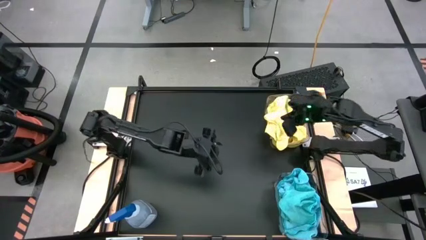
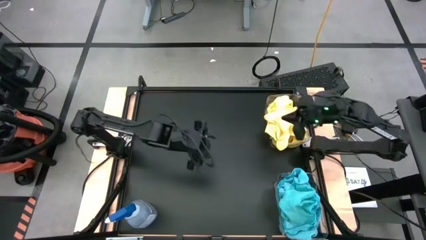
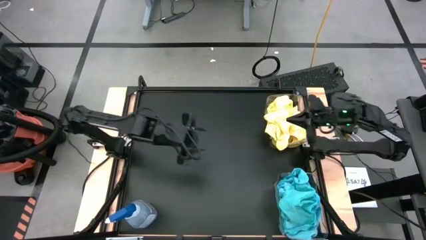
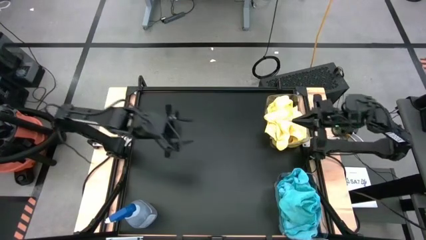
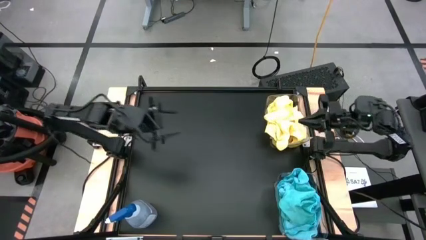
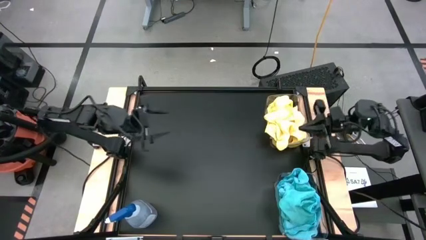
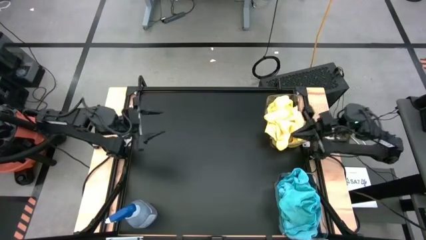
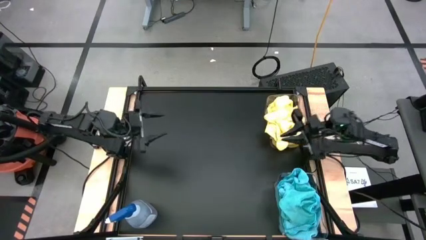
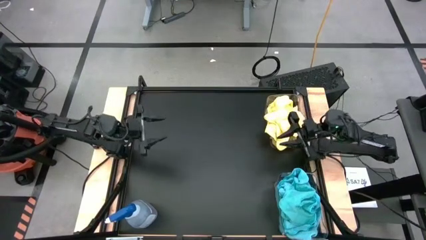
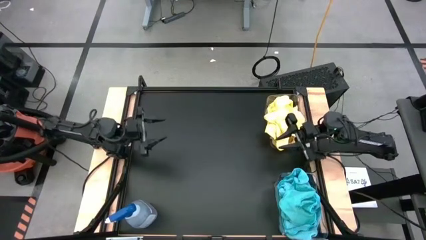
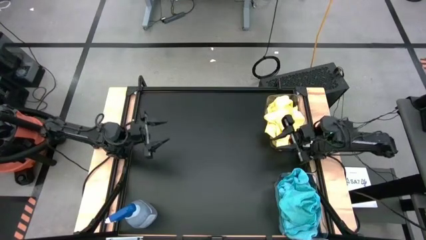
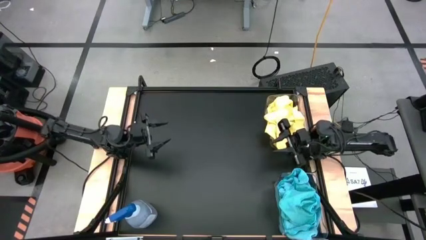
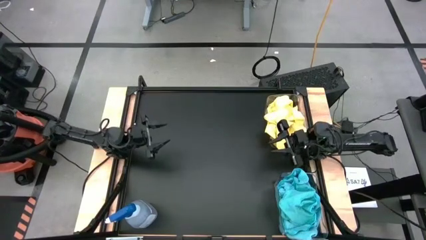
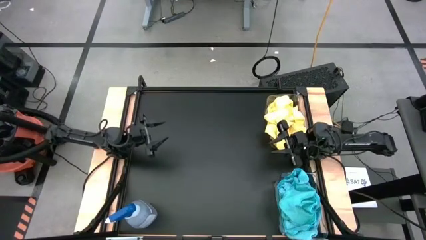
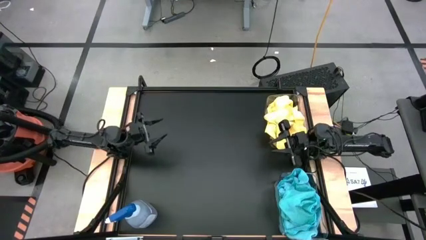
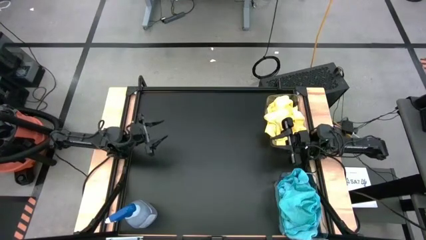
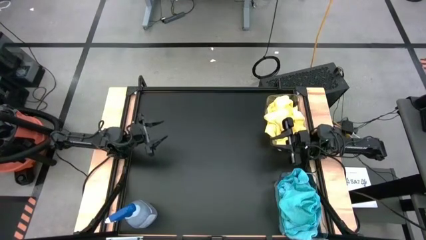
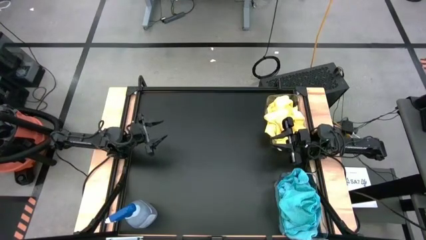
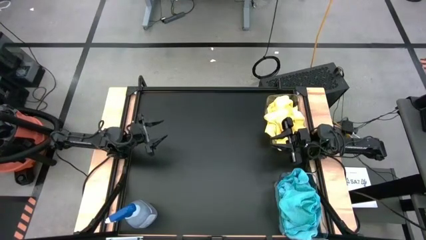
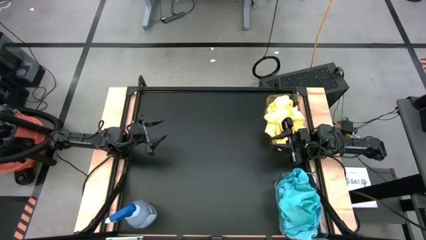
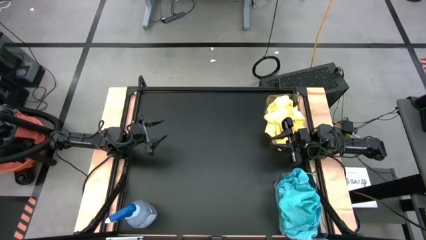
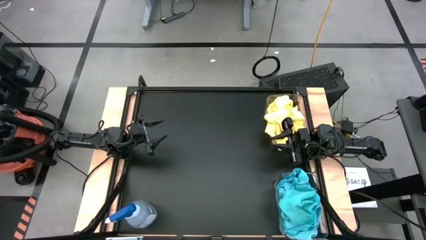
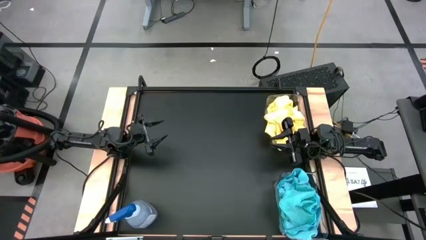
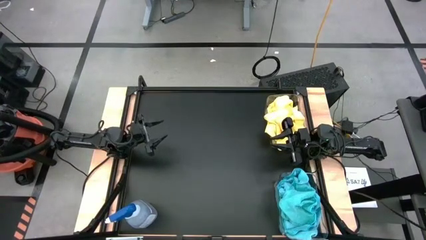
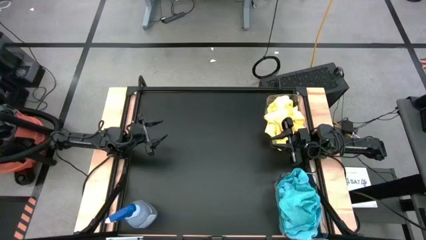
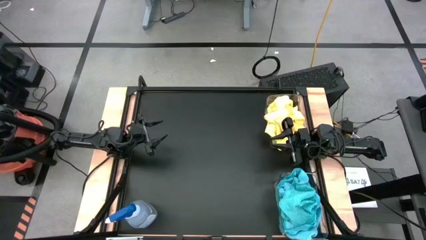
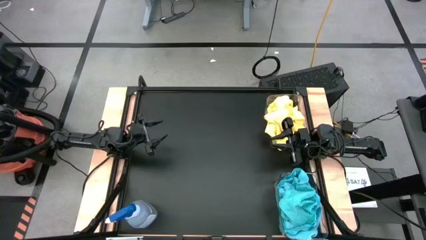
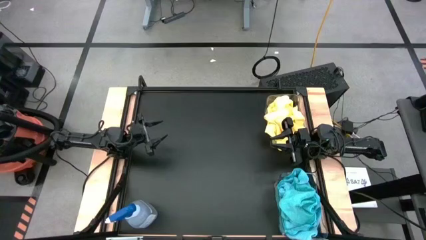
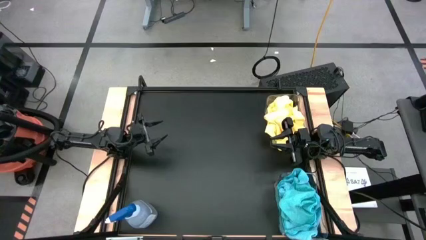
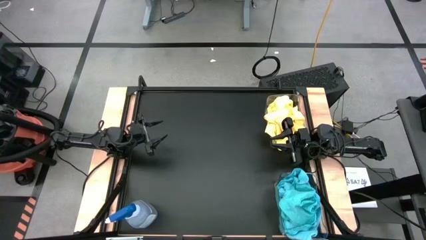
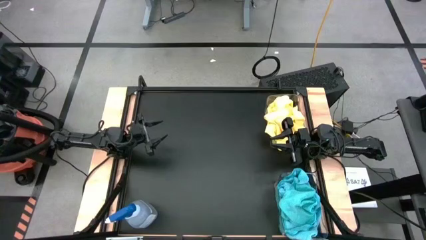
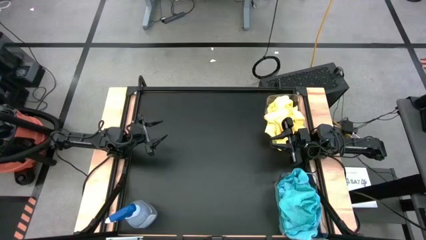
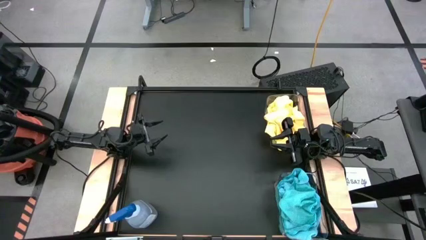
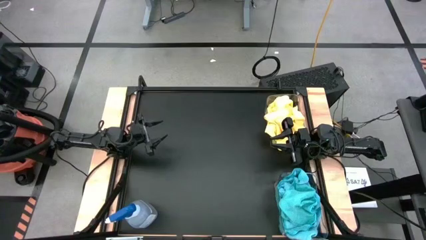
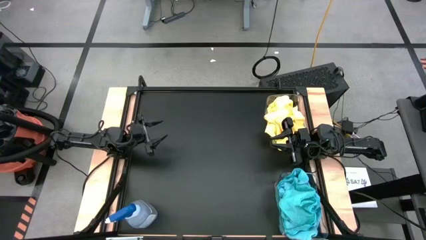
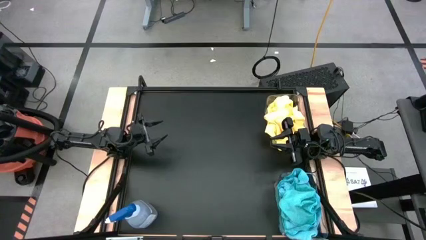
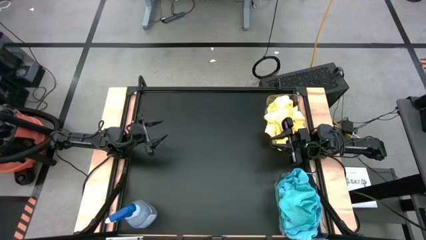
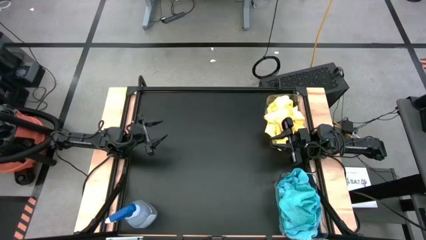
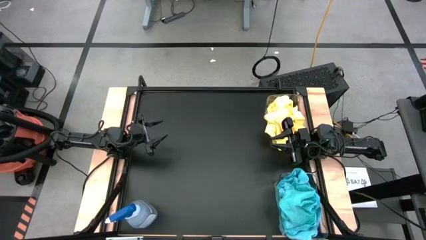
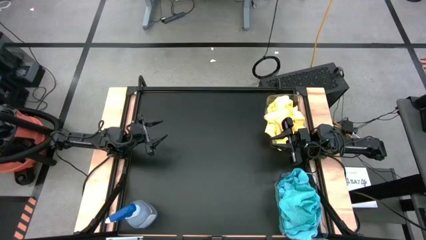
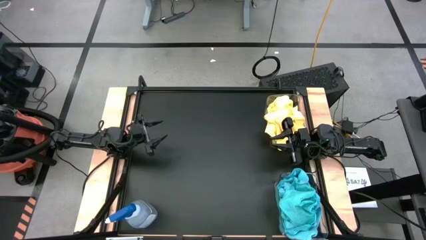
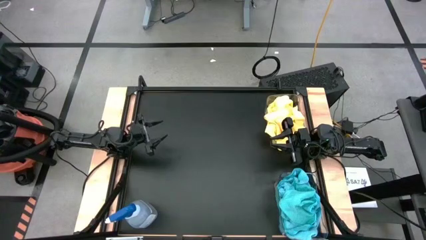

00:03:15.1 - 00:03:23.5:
Task: Sort microfiber towel by color & place in baskets
Return to Home Position

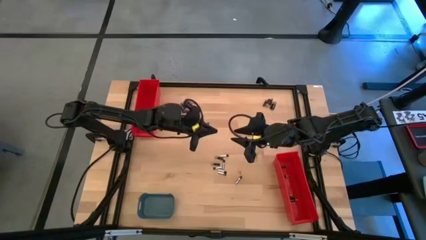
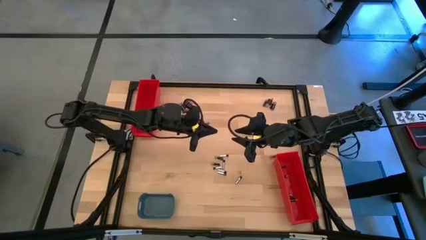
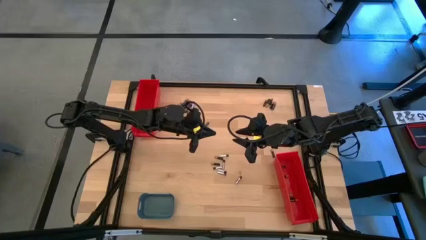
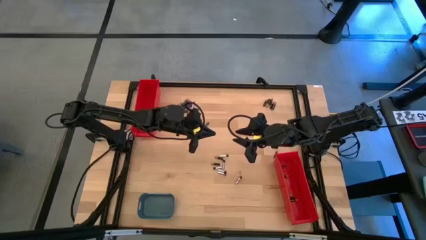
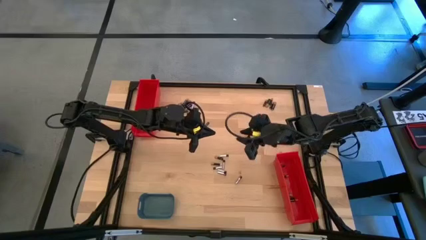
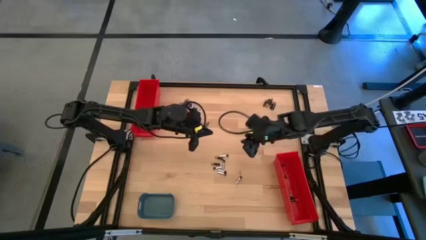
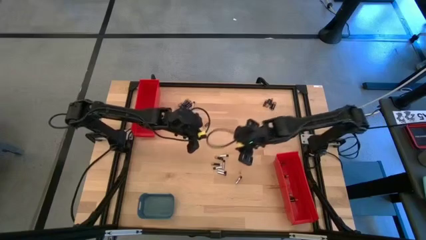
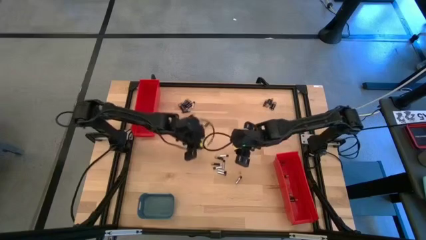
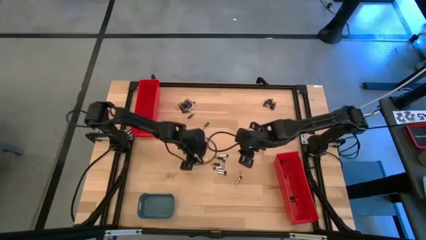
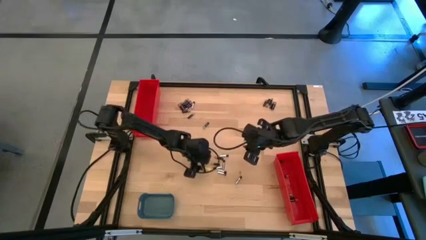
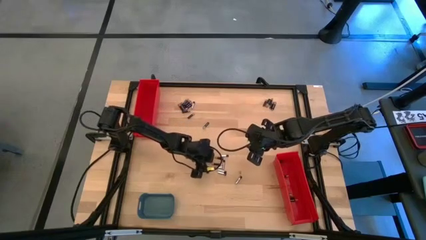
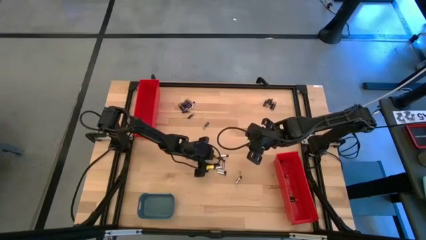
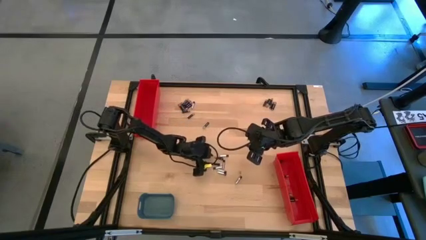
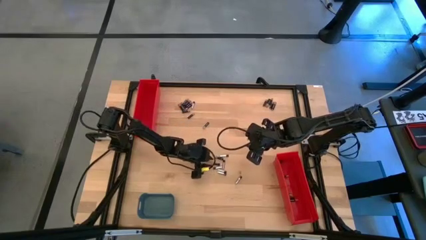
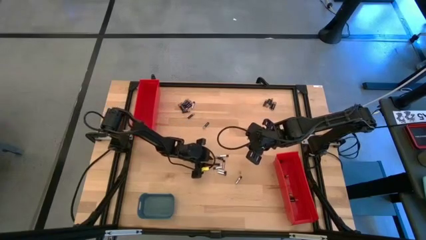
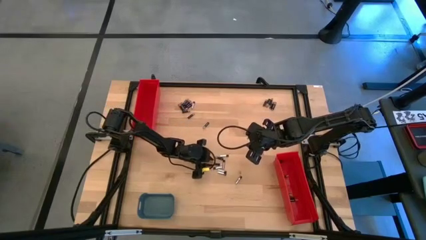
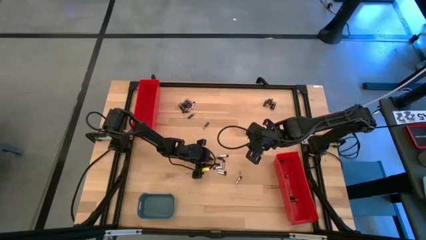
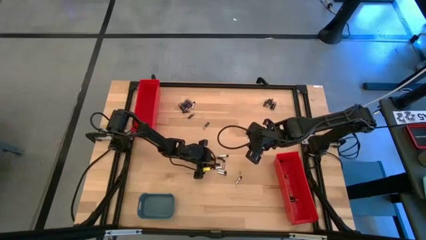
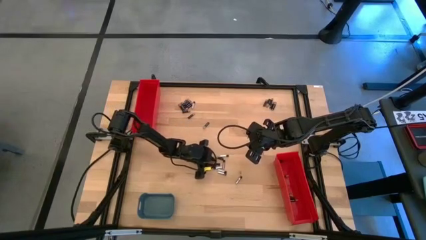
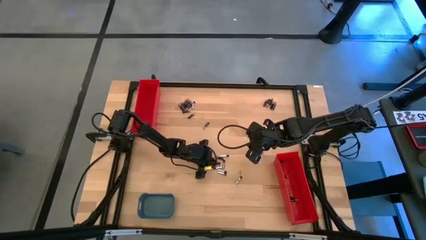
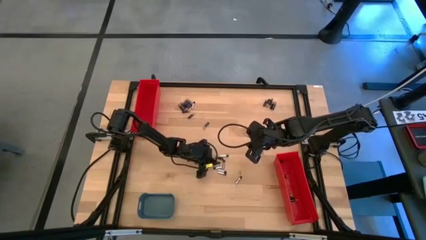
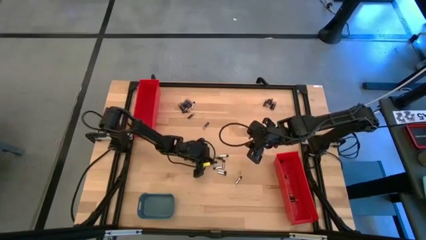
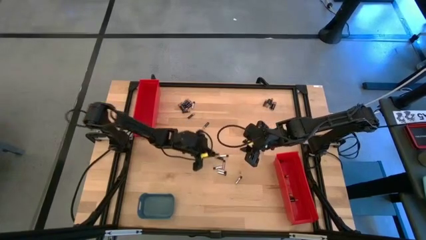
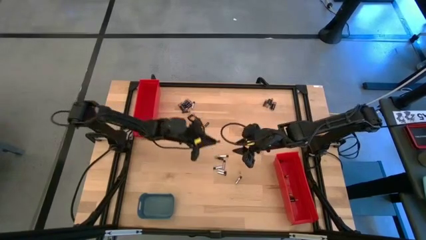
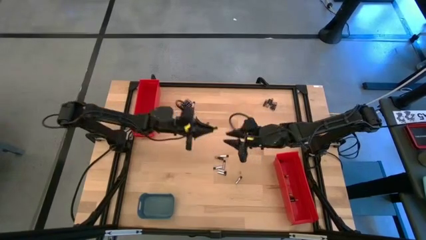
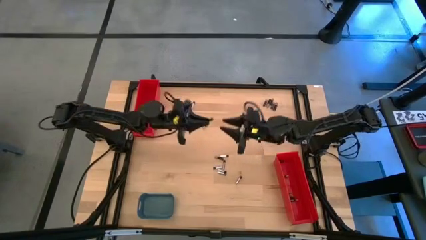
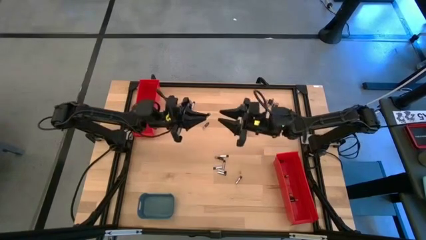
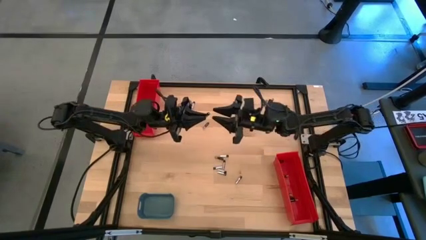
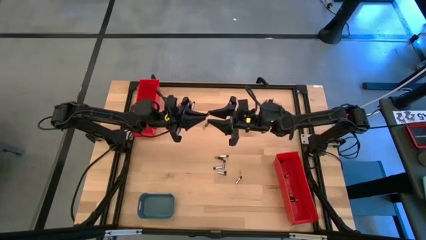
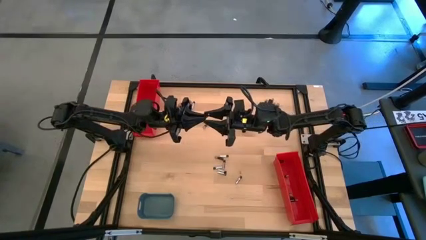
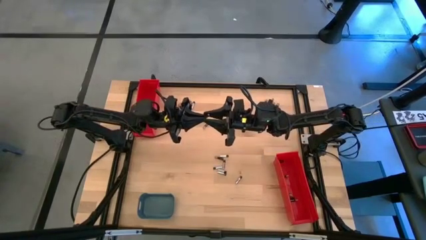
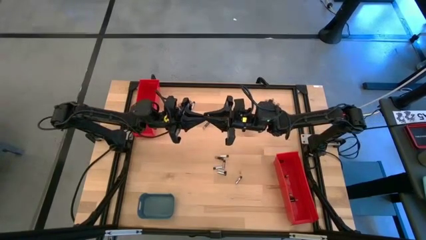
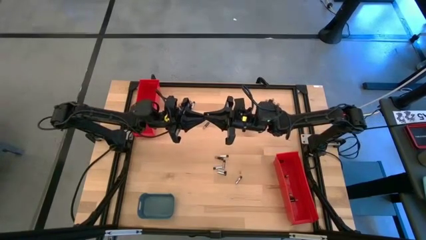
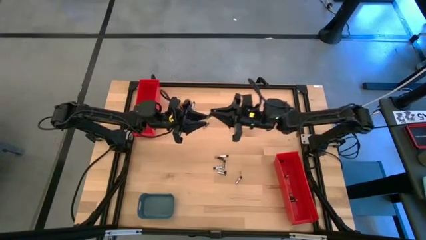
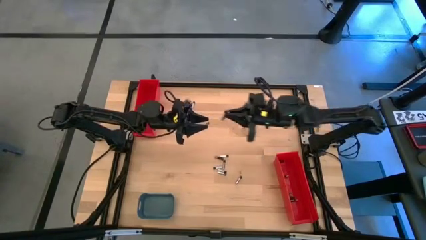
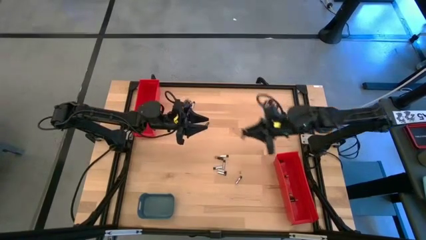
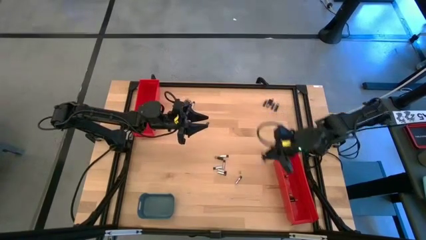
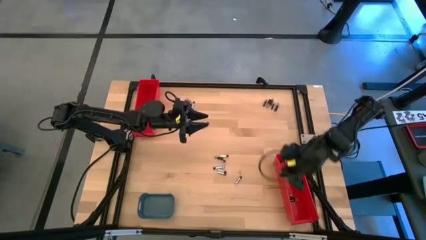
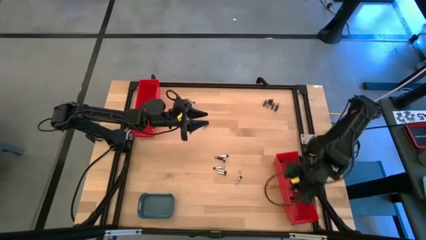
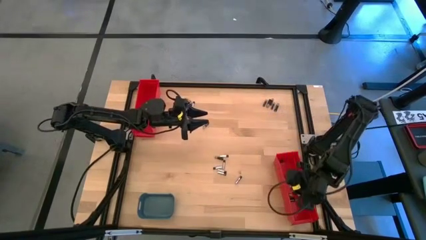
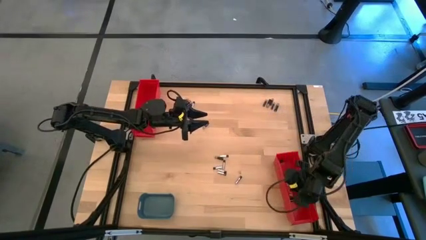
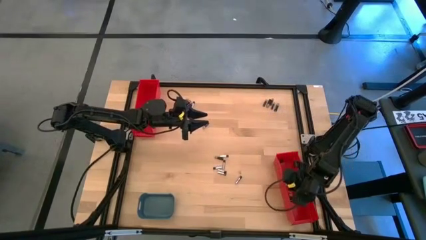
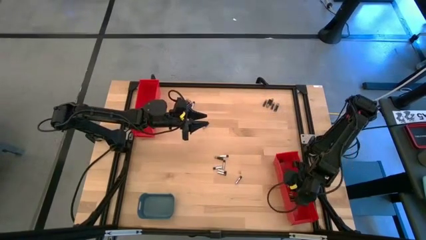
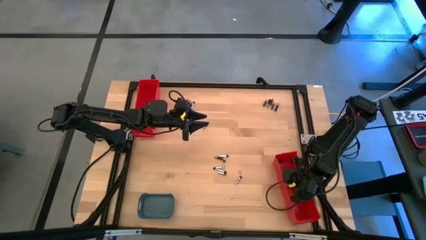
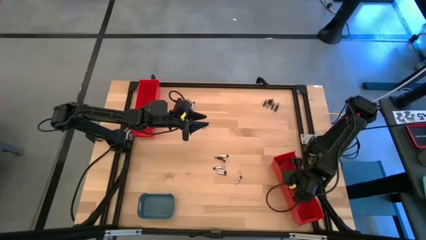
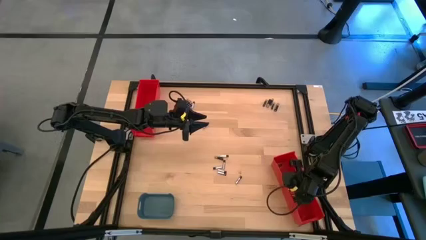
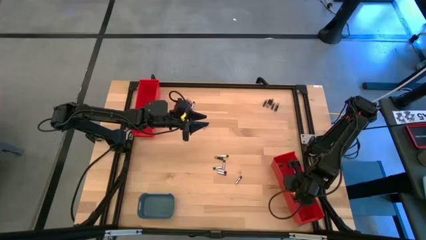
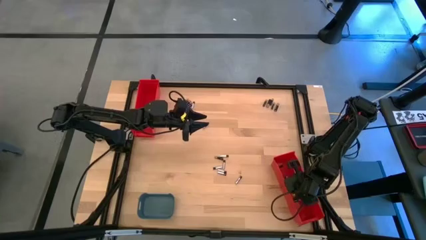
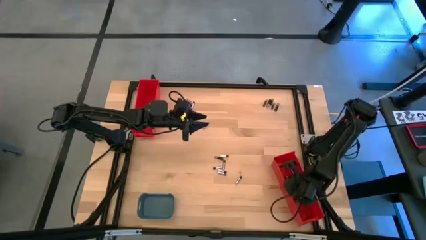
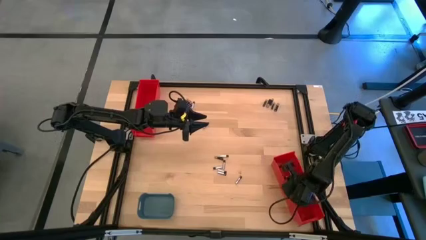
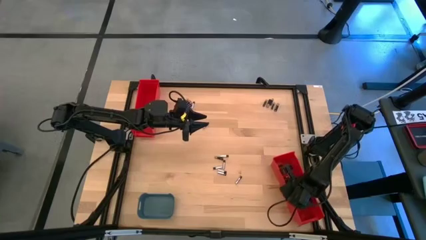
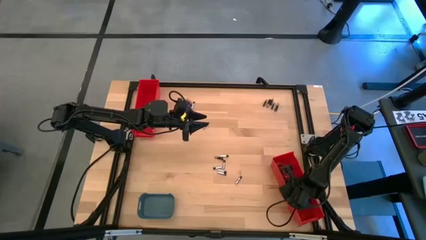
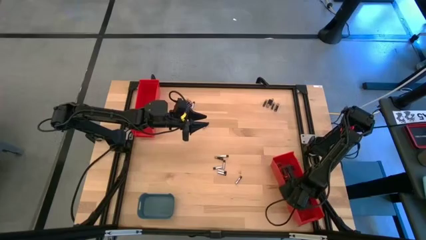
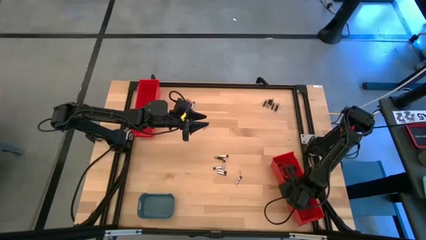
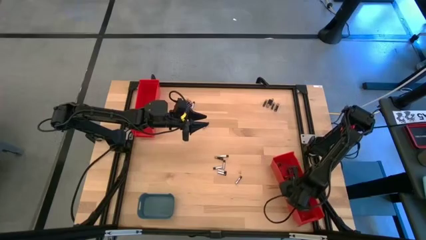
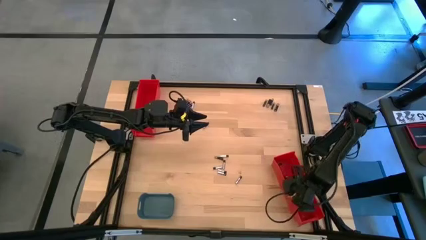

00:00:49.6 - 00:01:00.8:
Task: Sort batteries
Put the small black battery into the bottom red bin
